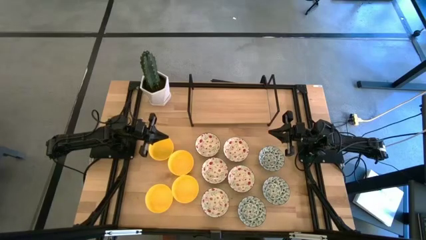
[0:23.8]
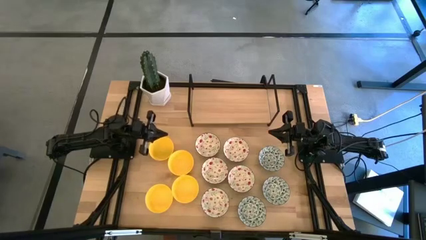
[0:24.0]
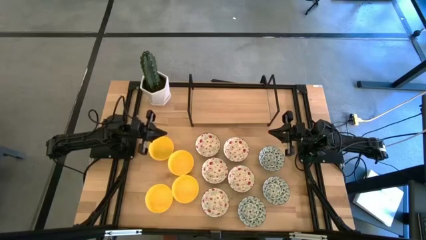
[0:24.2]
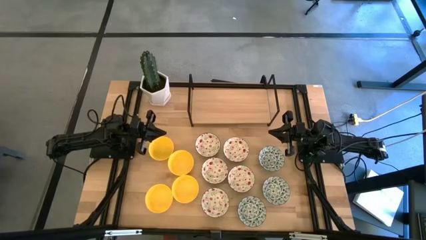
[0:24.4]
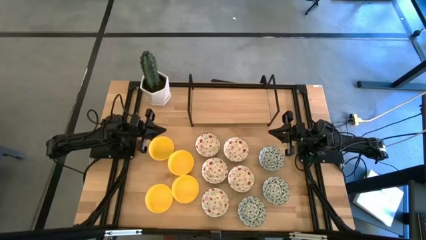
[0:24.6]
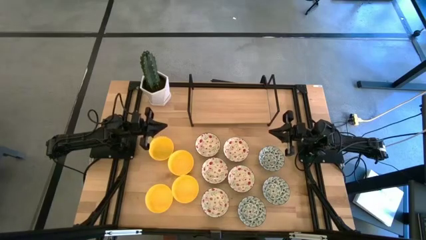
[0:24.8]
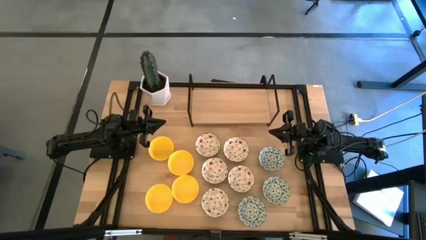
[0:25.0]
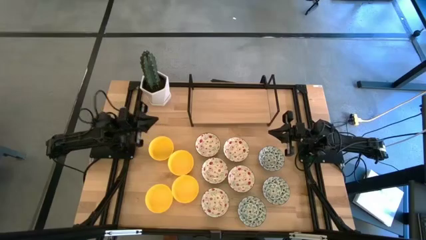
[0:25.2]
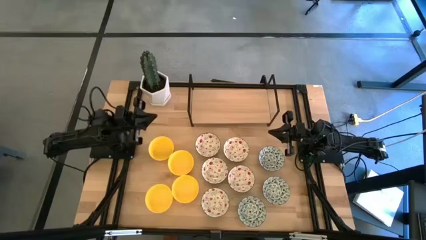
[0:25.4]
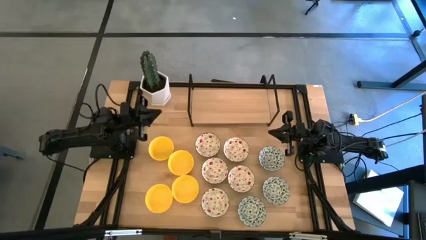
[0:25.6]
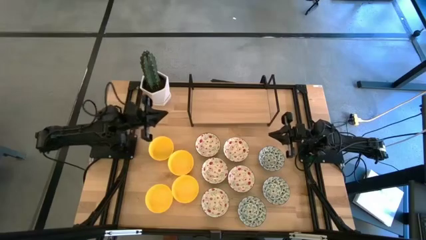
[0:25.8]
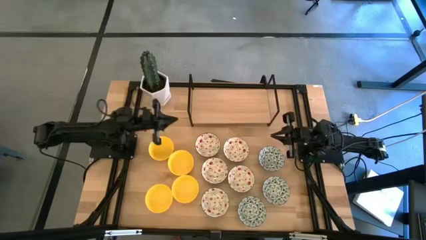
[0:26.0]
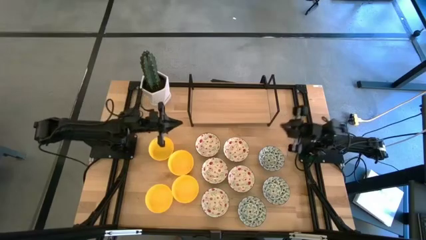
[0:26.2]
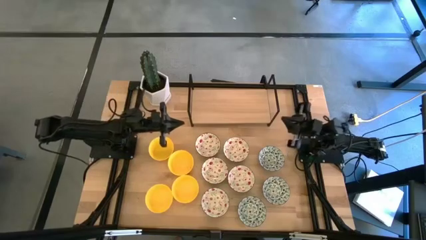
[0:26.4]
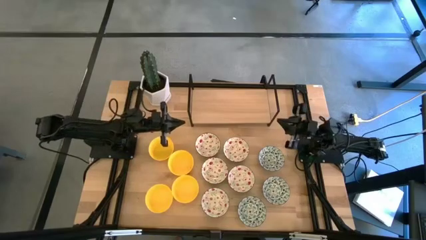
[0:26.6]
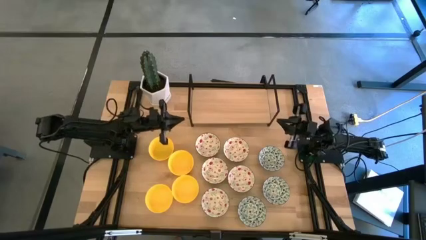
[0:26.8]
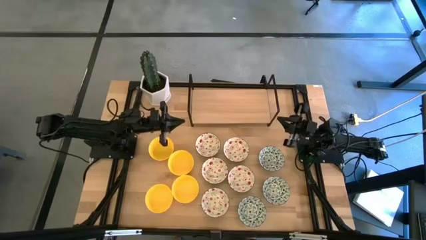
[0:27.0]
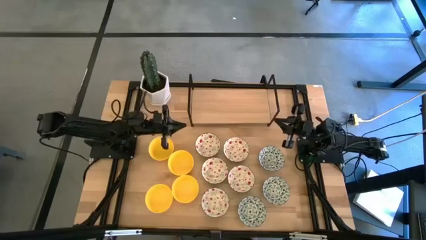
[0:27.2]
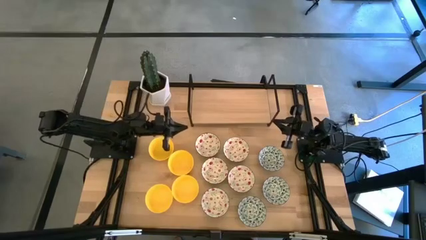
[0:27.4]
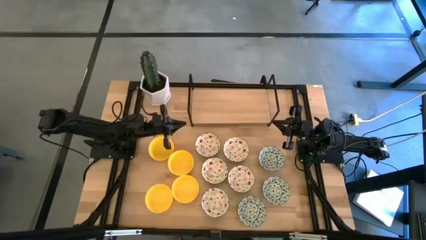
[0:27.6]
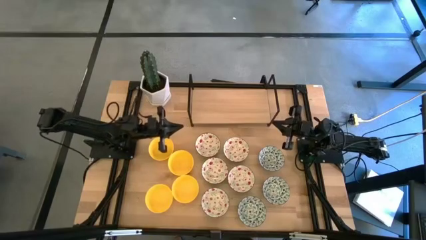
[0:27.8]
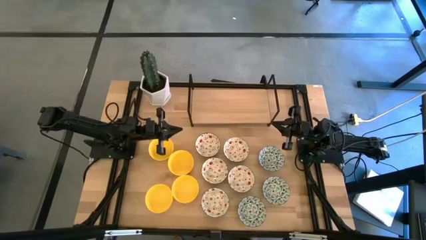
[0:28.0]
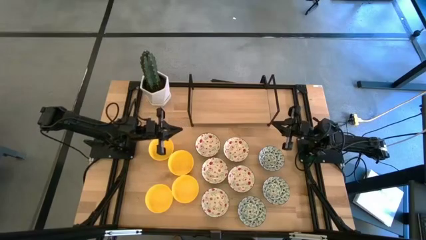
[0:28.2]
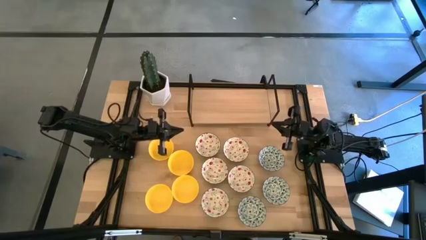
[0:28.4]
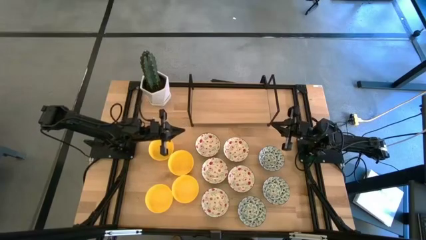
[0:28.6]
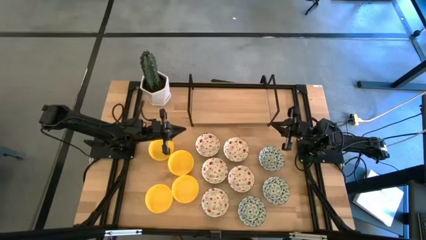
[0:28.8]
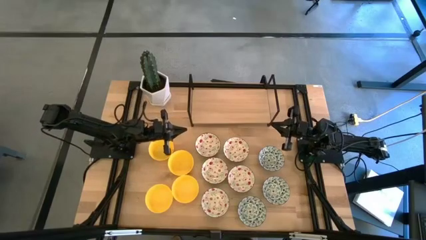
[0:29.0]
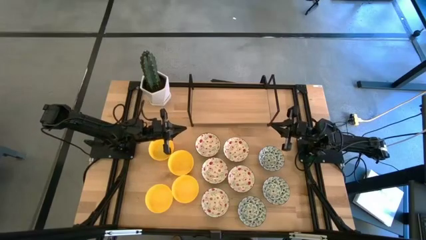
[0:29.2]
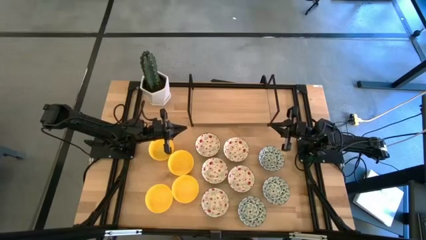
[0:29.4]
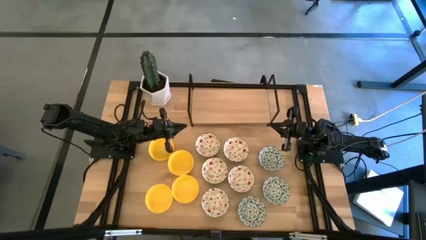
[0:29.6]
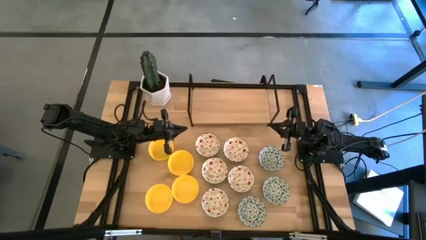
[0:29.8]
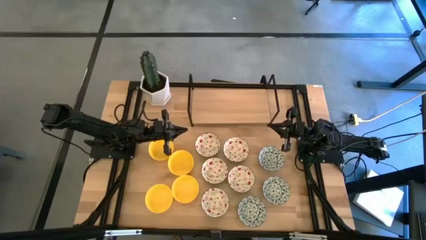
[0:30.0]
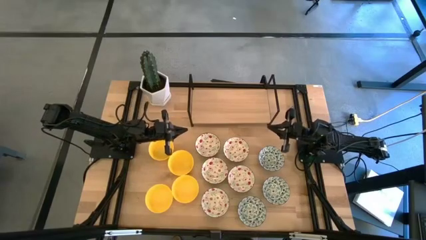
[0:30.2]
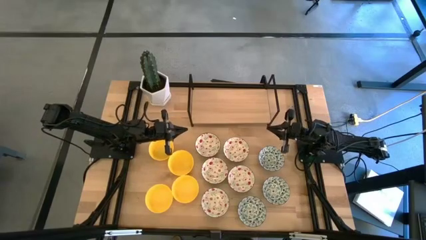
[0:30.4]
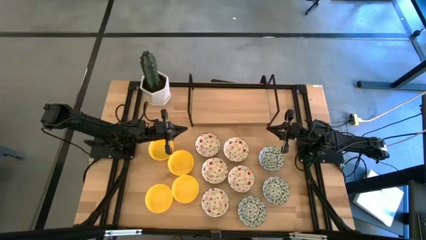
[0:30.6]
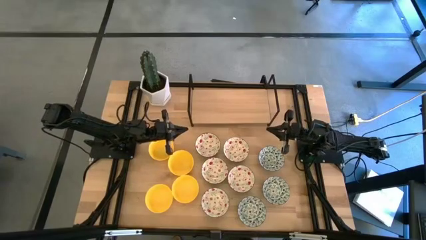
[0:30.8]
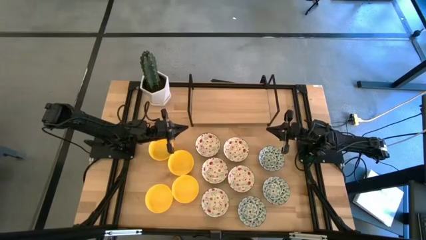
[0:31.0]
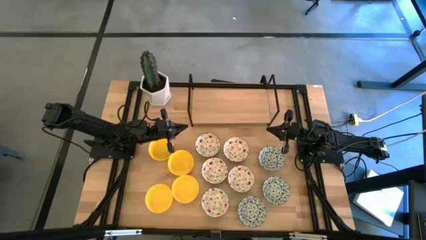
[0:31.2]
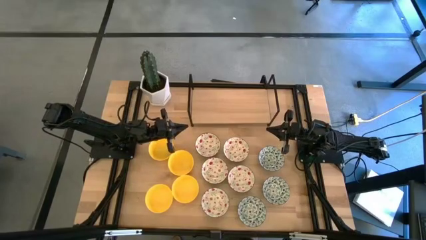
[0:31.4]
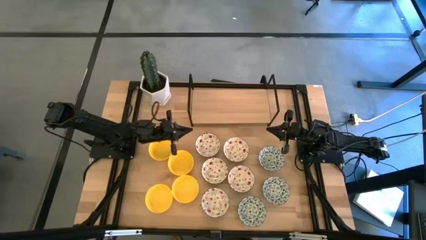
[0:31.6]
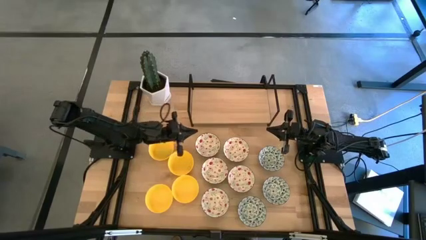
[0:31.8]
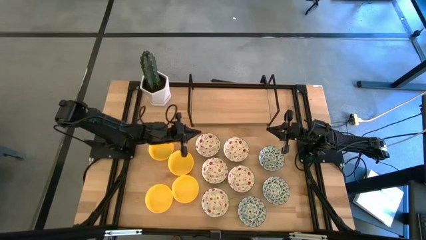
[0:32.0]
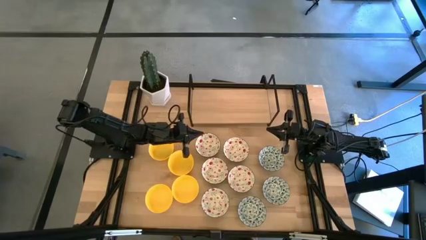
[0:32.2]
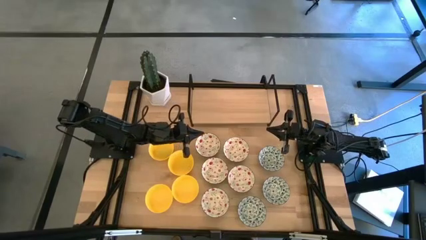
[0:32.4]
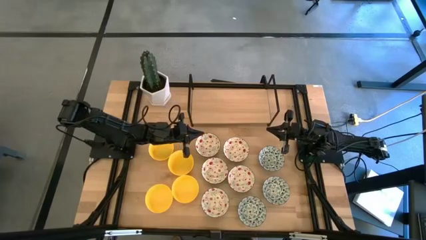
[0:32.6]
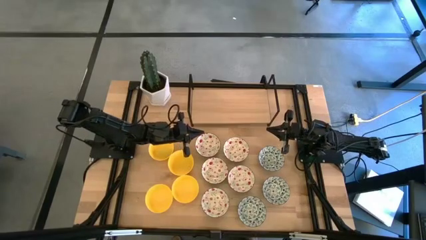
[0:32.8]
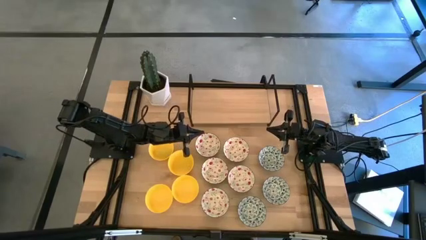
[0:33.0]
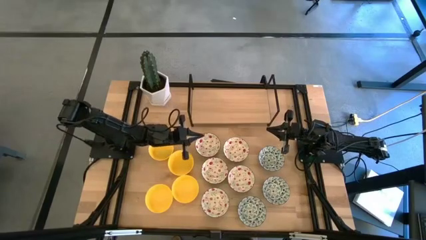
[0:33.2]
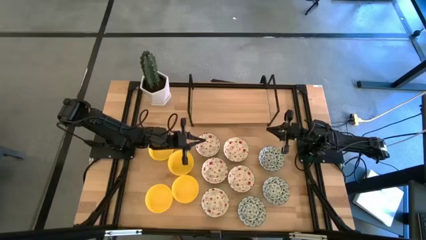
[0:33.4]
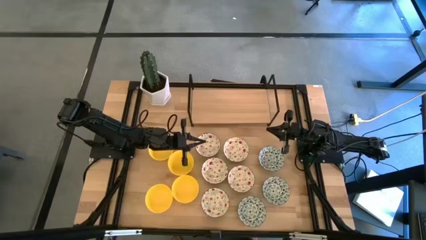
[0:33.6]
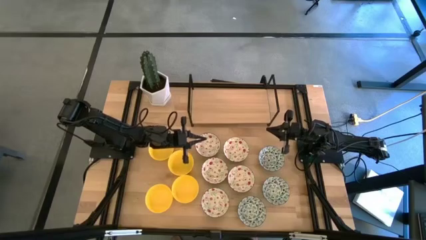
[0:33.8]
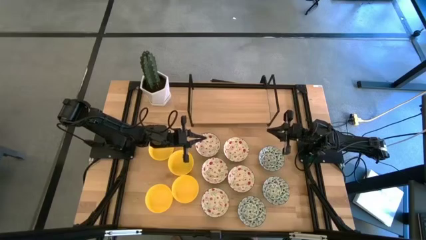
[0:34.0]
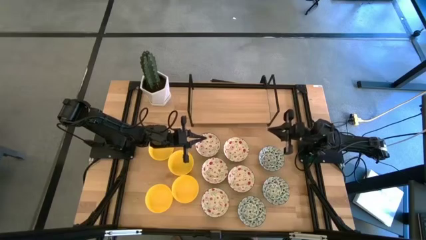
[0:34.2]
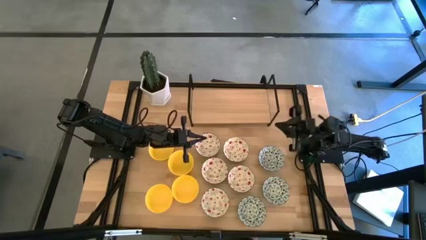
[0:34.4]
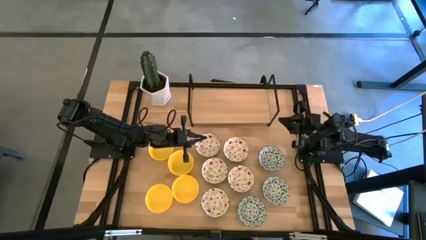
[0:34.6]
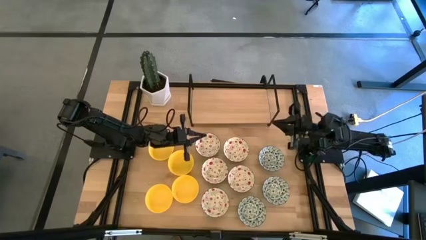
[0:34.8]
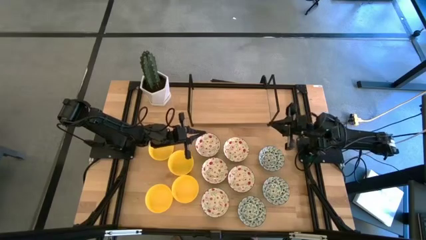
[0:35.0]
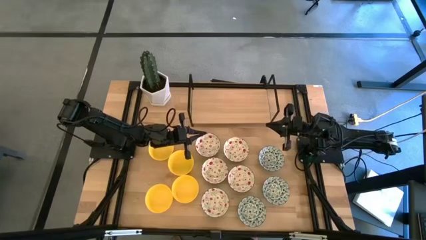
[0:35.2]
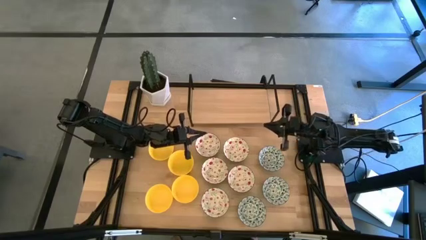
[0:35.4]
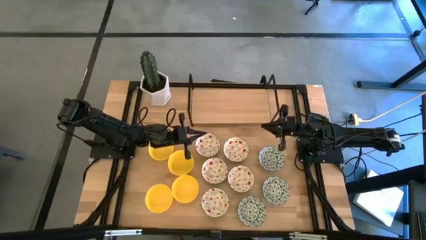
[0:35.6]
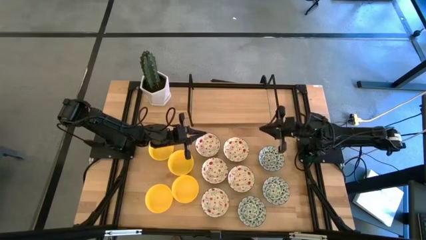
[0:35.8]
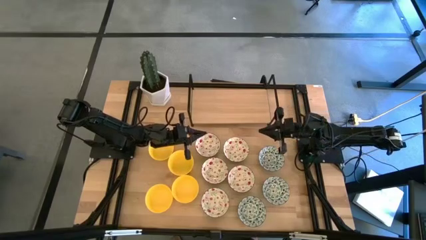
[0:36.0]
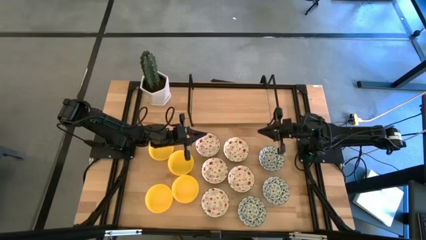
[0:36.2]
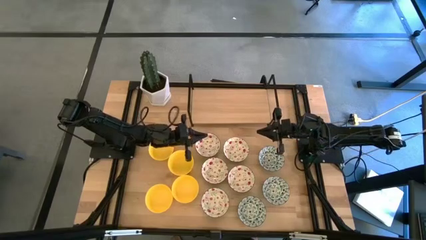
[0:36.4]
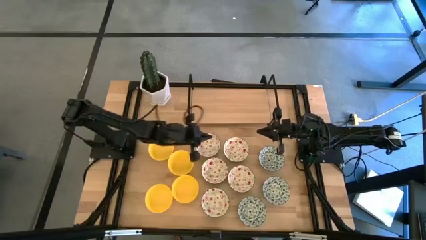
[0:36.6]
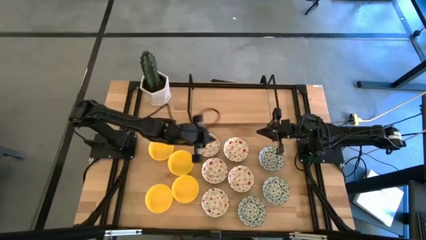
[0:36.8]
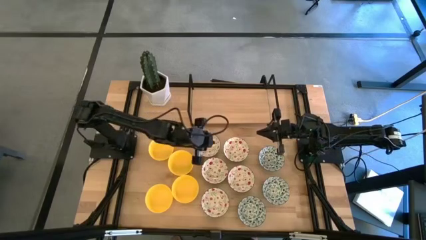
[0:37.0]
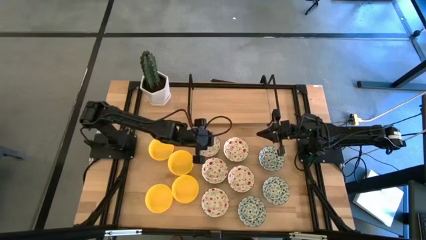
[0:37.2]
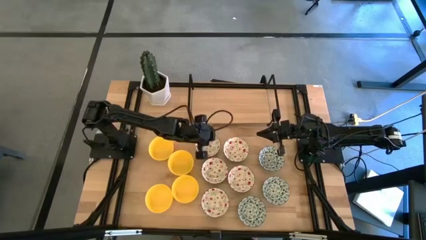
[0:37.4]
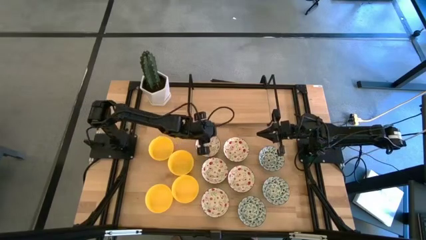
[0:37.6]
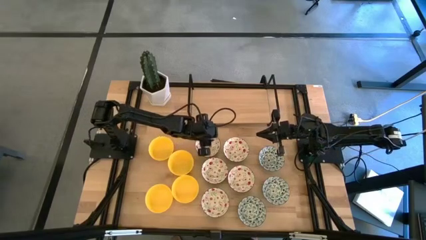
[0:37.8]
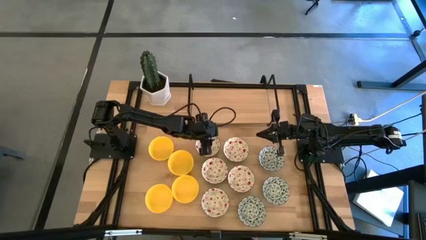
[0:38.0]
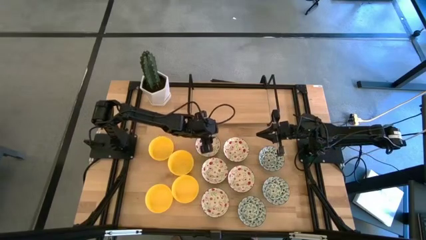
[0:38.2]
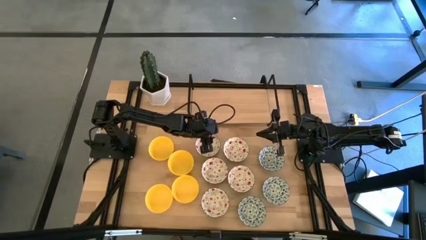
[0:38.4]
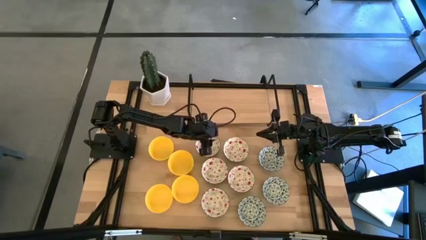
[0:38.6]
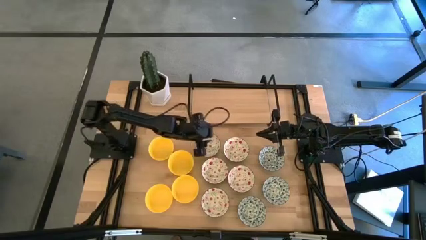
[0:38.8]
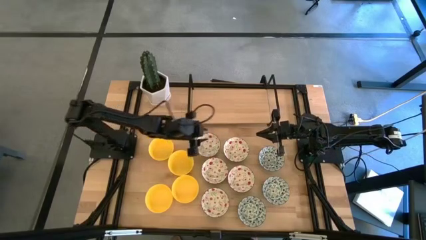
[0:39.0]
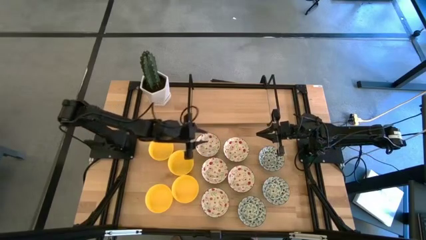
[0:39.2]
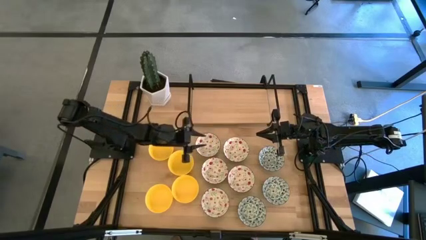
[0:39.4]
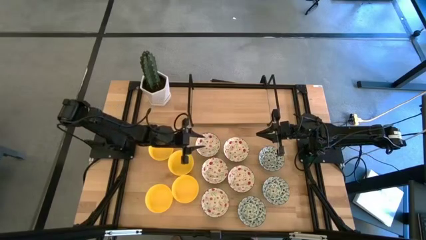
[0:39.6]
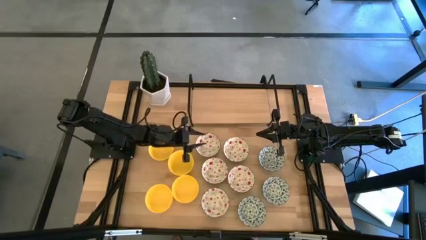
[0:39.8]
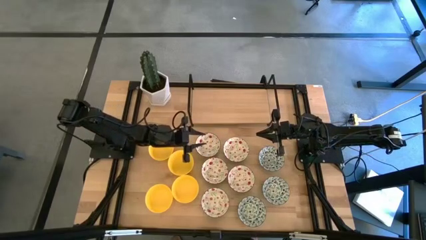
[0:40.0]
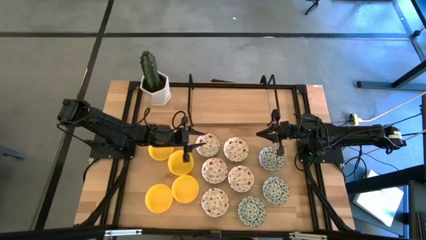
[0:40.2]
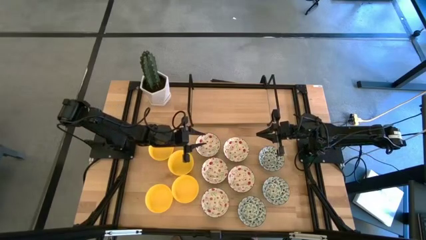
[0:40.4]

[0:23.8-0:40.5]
Task: Pick & Place Mini bowls
Put the red patterned bowl on the shelf
